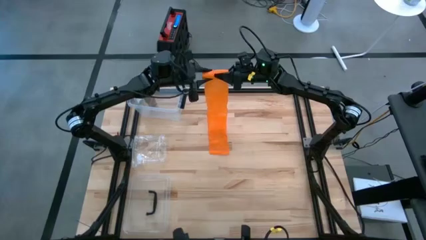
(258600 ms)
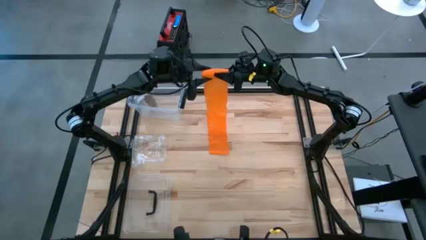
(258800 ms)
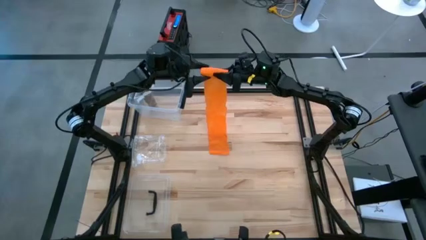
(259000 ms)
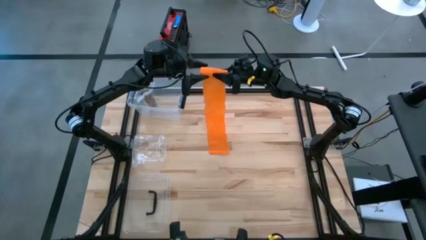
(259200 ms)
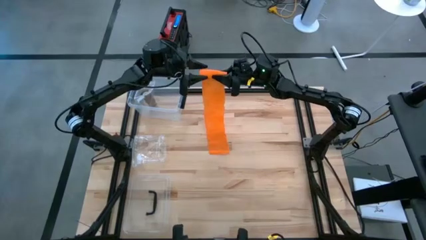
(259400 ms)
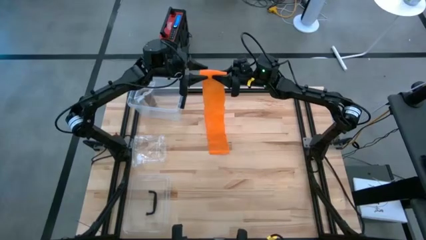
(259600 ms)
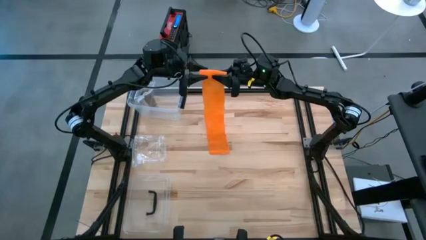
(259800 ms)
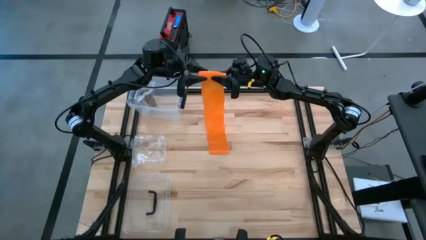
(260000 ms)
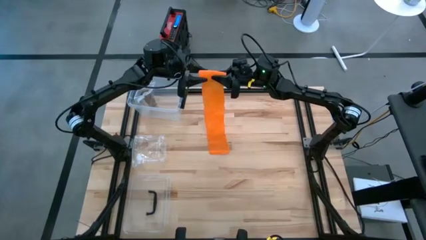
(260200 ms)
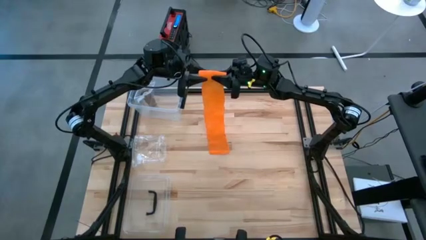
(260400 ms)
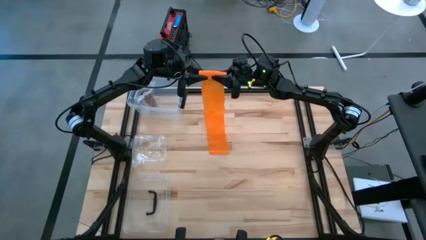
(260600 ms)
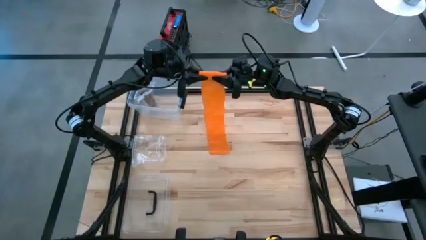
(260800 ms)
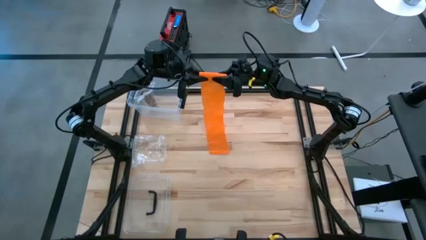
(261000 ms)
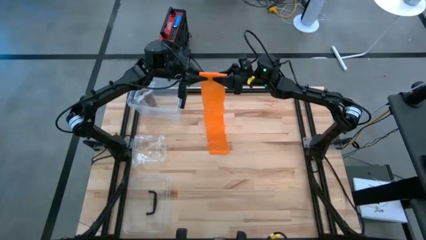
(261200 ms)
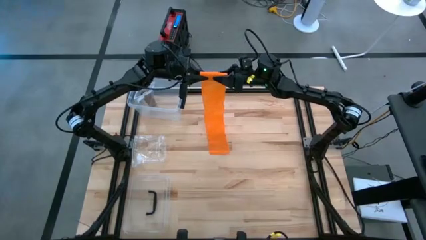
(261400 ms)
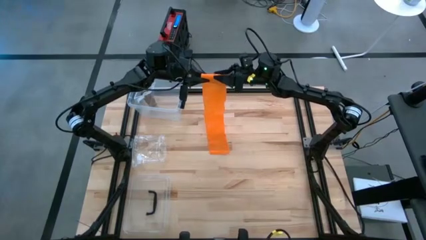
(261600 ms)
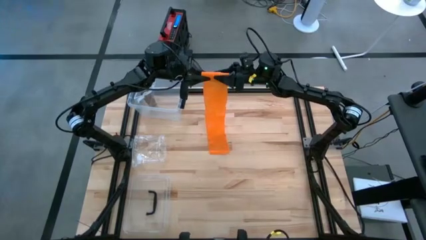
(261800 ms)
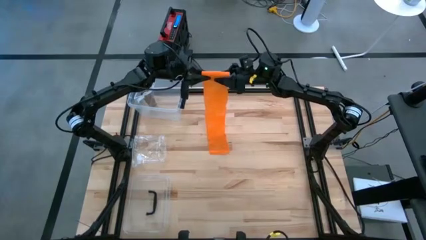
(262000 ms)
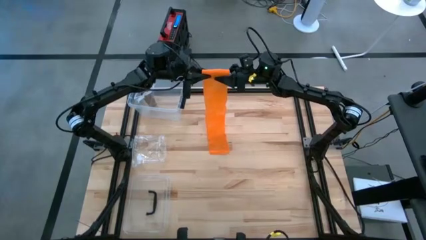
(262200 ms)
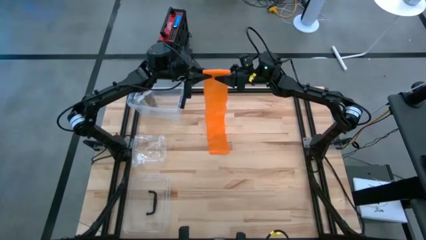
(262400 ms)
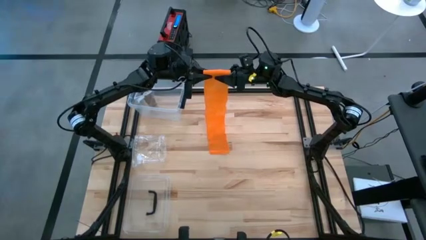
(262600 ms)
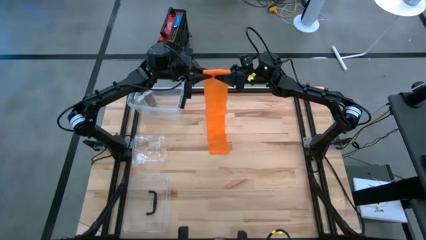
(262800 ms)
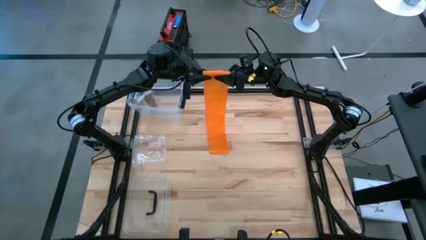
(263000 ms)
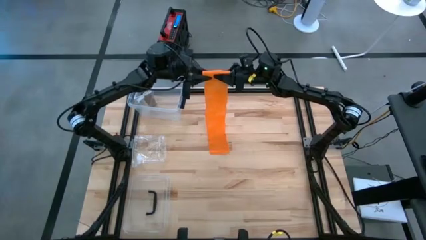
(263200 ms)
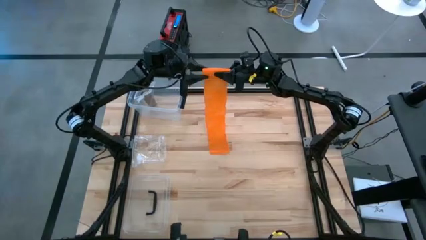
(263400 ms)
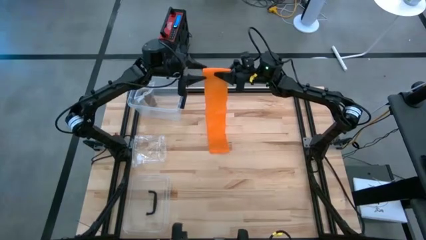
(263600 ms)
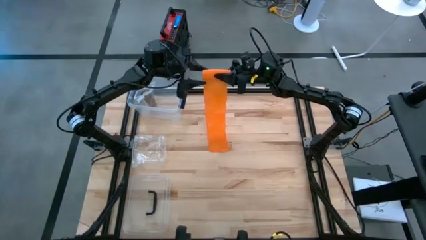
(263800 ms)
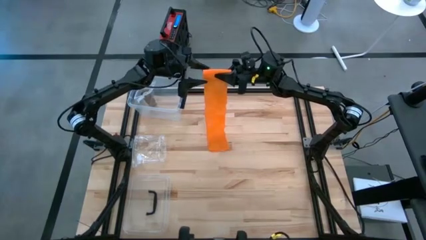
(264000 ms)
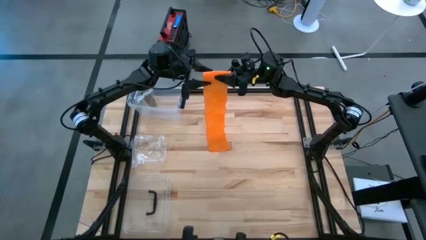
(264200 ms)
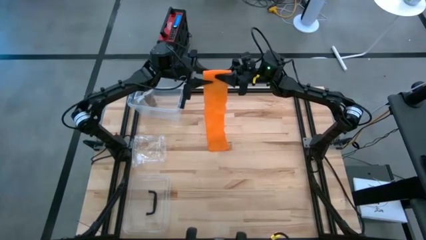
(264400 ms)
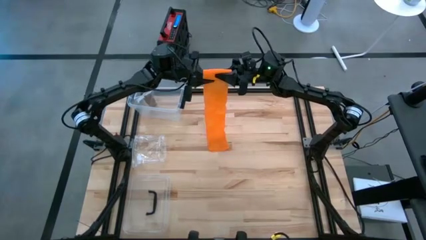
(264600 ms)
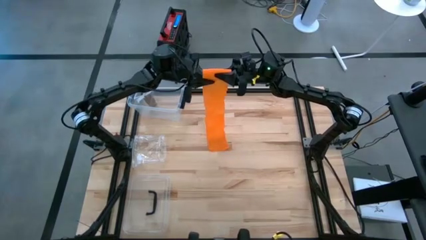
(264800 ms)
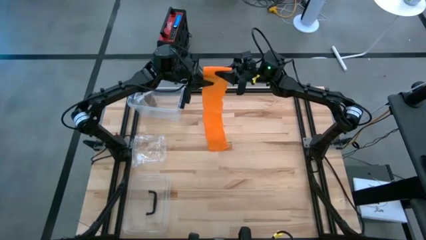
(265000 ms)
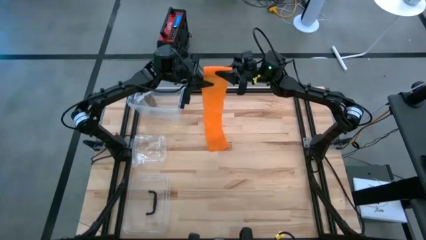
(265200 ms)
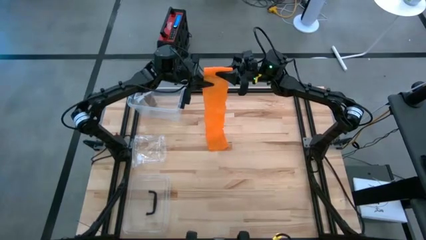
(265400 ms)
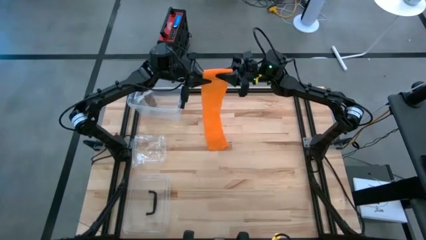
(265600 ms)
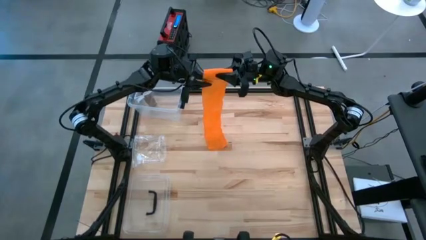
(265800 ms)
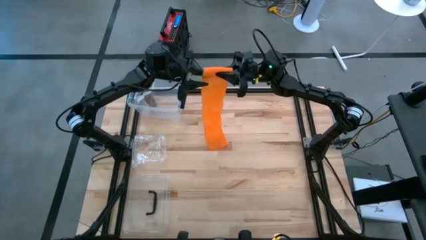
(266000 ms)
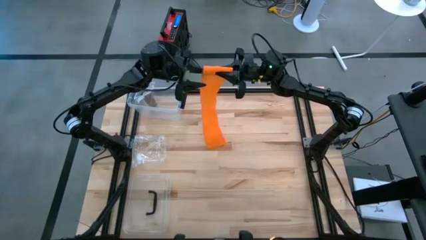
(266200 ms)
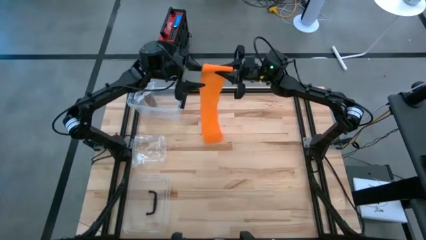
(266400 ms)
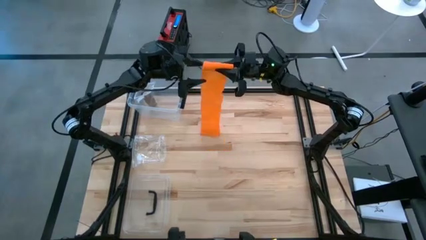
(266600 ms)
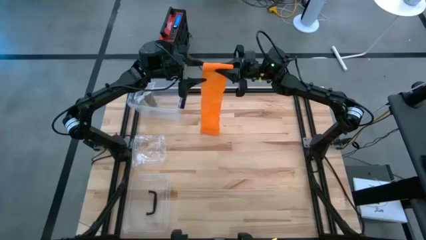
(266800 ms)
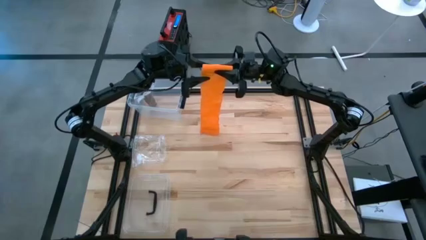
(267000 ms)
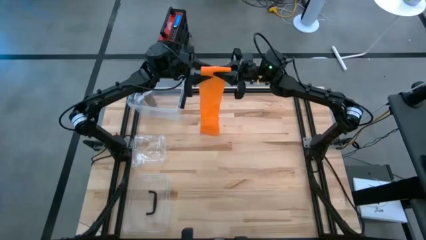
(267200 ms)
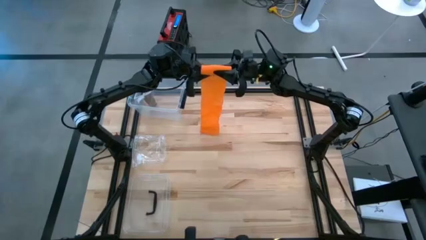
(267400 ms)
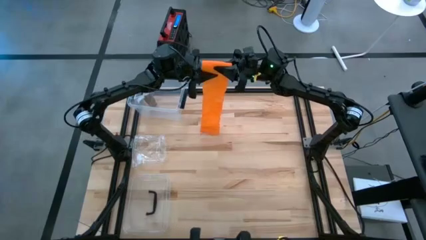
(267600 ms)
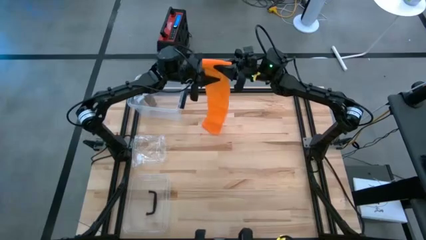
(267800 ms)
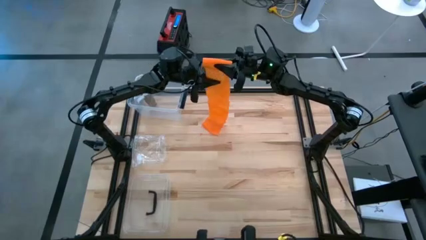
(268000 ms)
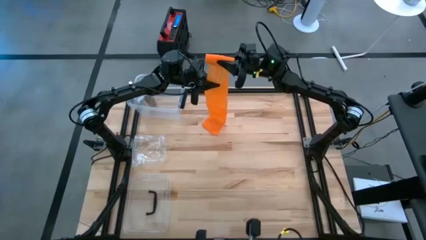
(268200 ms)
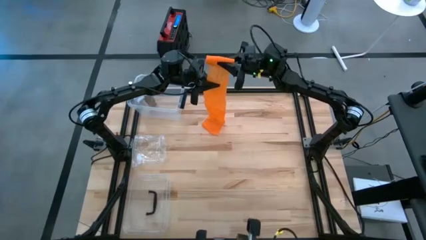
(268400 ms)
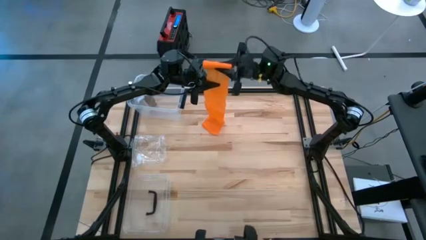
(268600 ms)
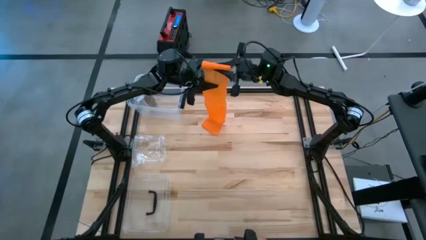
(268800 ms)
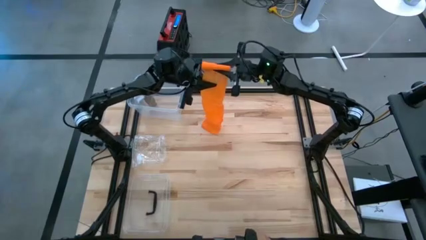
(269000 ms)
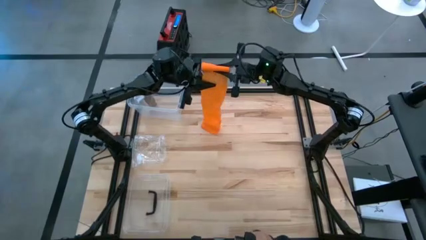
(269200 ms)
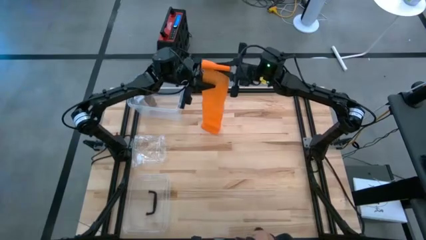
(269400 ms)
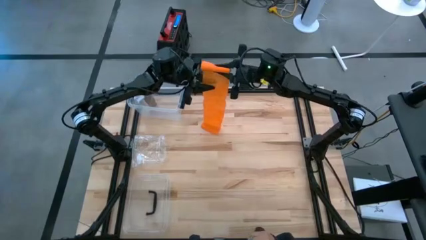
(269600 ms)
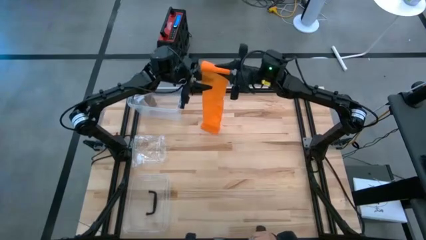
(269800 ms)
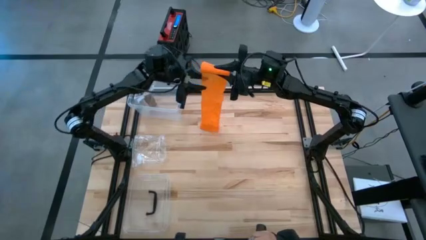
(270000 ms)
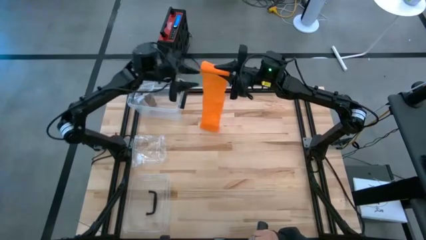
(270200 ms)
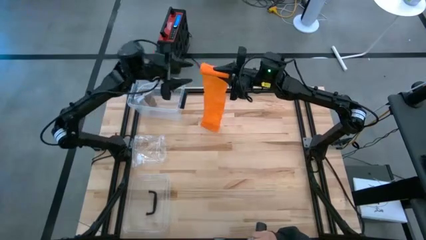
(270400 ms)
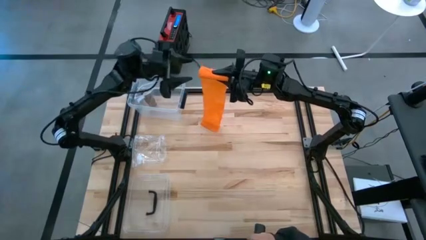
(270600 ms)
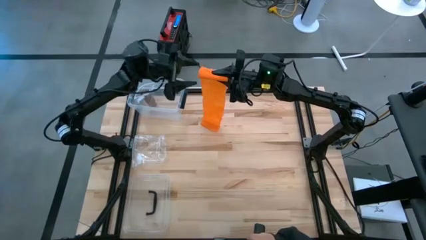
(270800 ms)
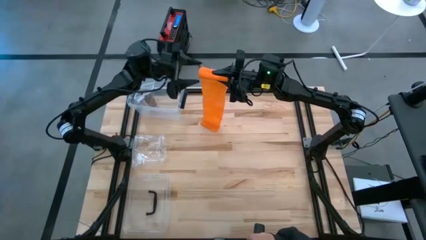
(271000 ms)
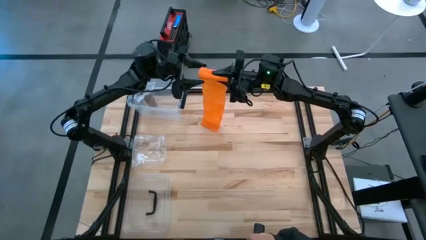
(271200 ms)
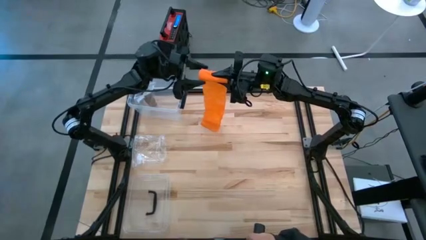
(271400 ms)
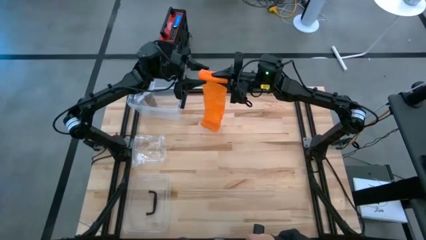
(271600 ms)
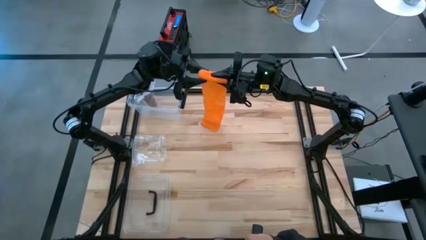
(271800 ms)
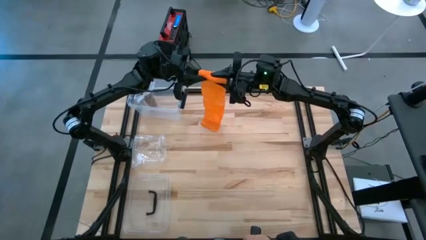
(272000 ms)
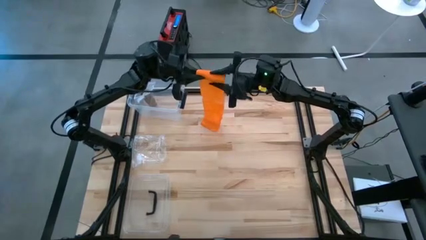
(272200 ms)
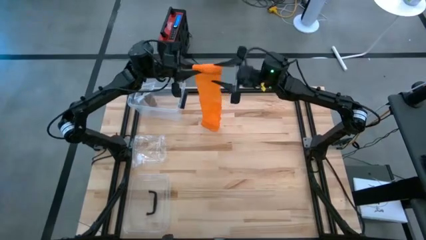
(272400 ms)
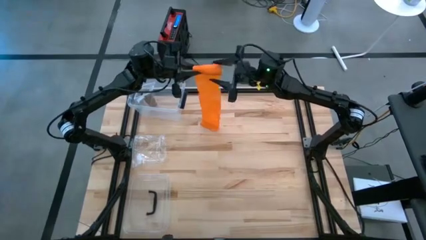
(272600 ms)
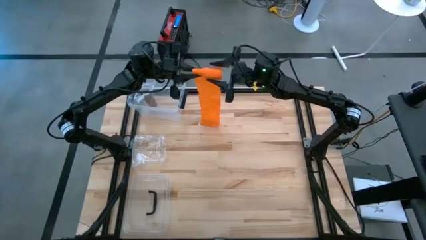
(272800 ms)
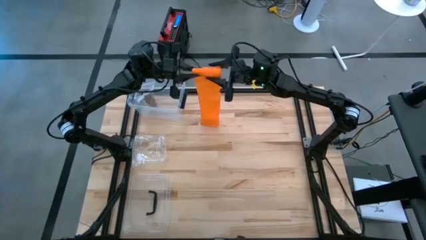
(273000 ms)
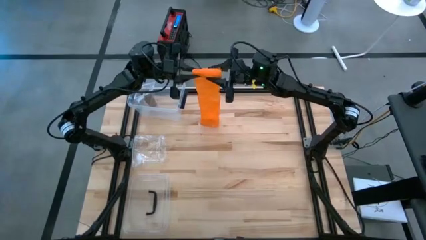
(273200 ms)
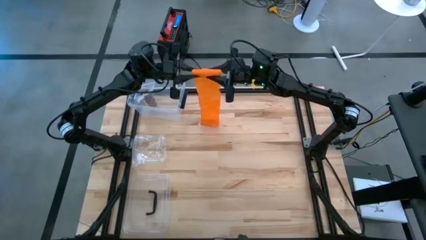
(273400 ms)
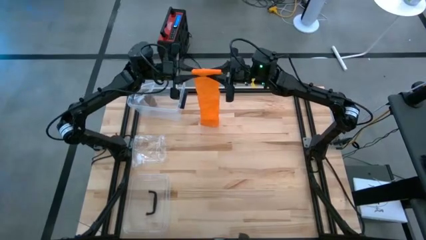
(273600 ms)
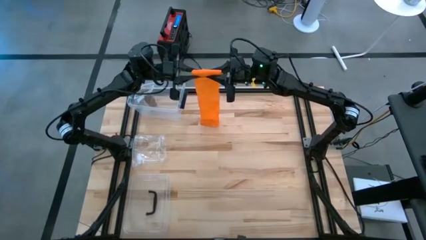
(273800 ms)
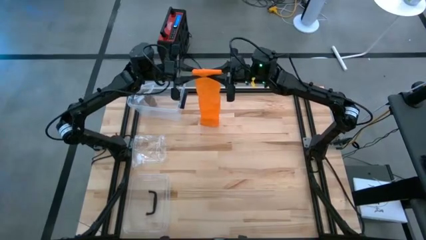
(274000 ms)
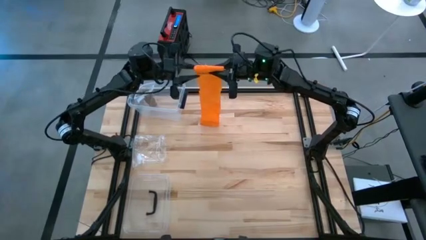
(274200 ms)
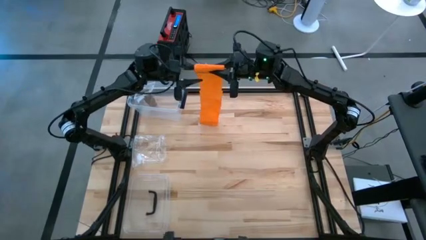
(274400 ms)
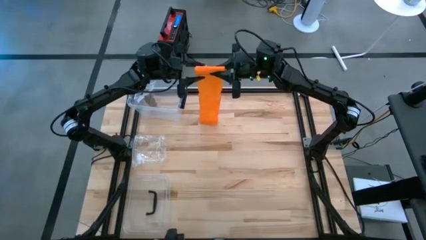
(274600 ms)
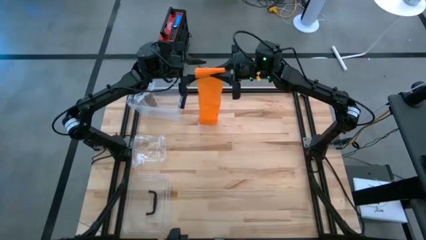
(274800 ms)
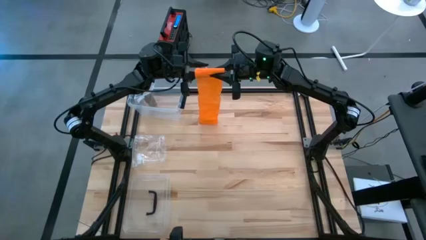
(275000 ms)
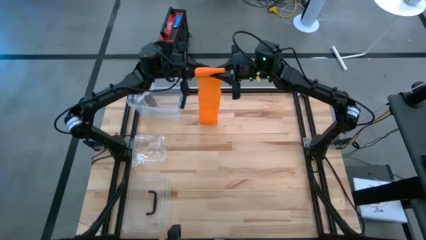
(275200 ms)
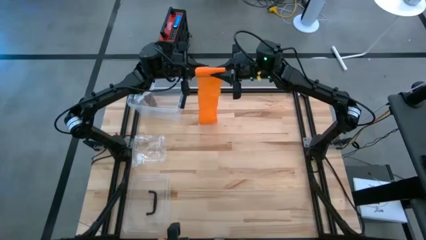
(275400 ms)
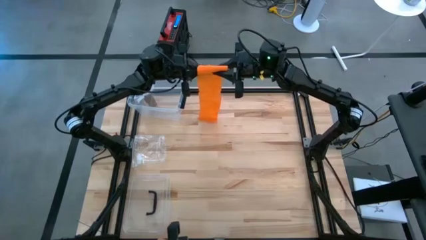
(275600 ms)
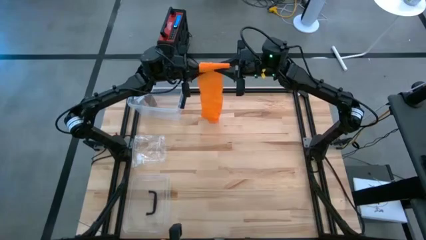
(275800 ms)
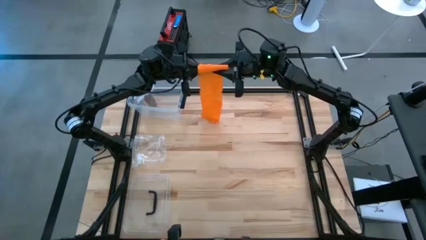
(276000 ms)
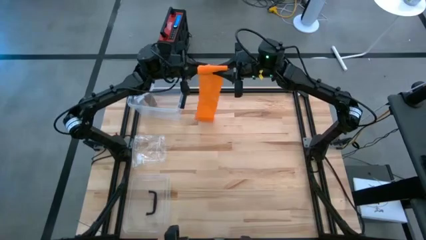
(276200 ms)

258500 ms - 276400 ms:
Task: Roll bandage
Roll the orange bandage
